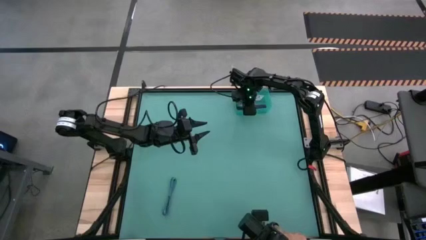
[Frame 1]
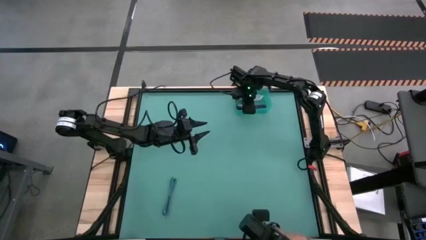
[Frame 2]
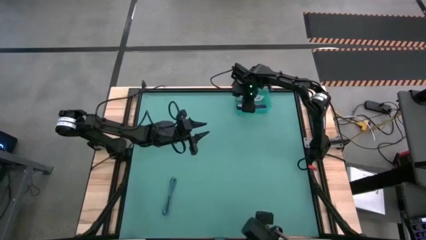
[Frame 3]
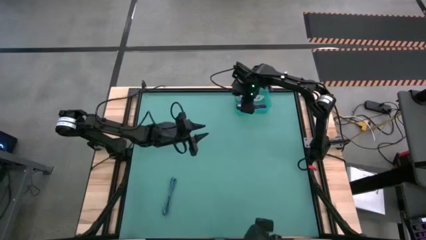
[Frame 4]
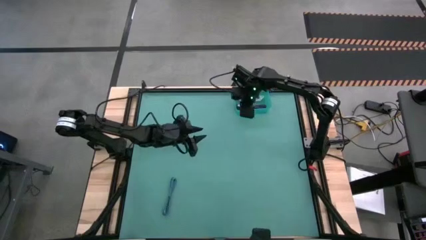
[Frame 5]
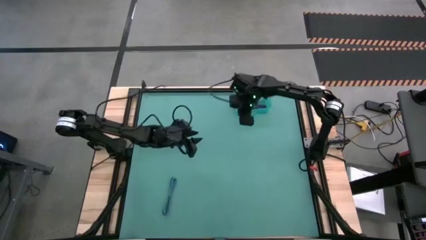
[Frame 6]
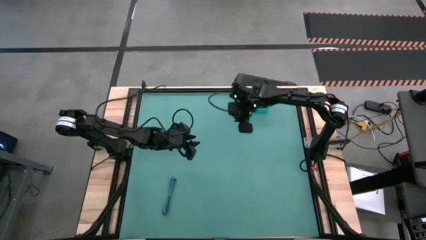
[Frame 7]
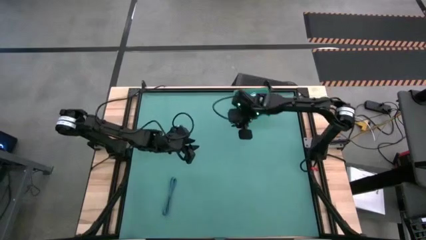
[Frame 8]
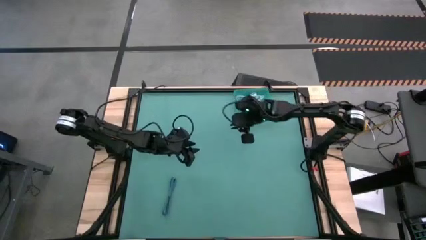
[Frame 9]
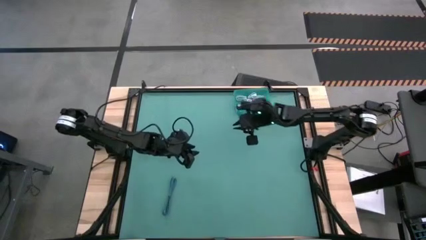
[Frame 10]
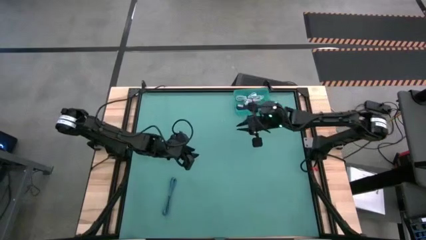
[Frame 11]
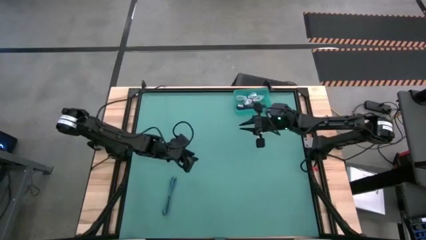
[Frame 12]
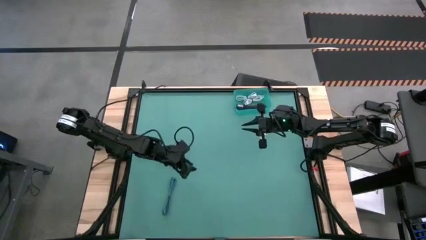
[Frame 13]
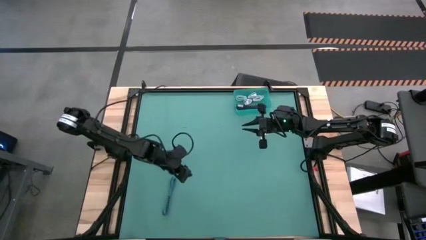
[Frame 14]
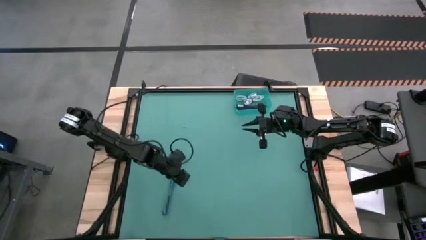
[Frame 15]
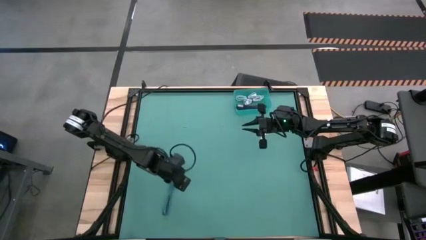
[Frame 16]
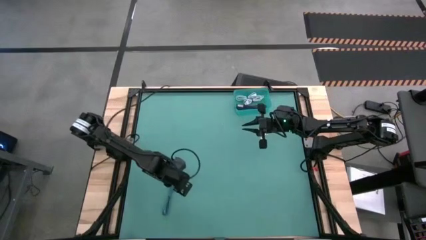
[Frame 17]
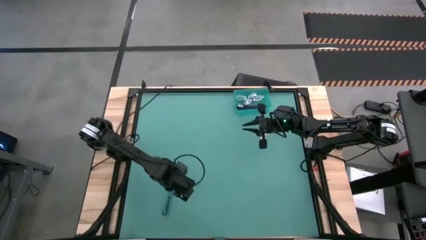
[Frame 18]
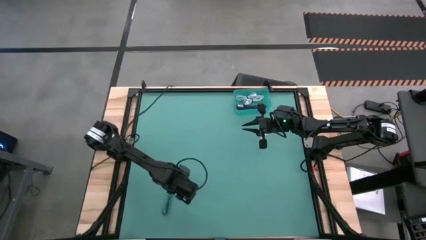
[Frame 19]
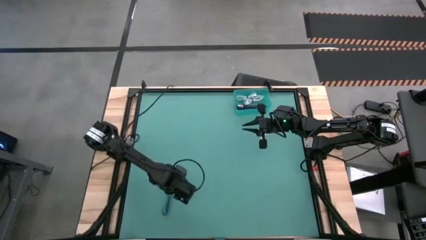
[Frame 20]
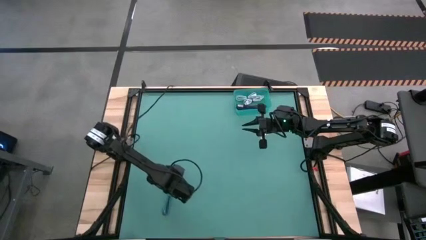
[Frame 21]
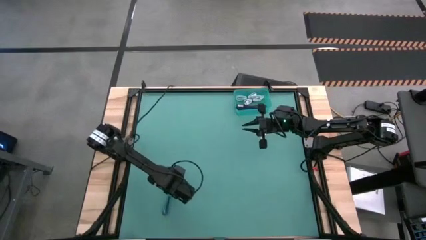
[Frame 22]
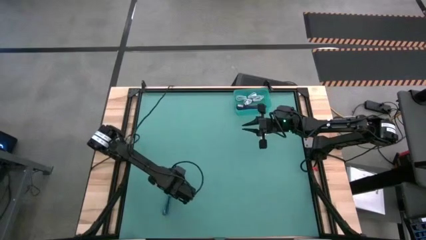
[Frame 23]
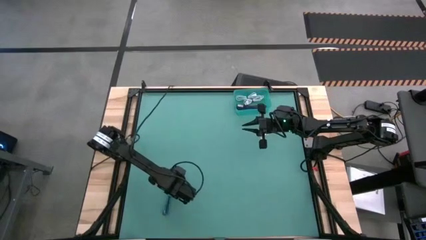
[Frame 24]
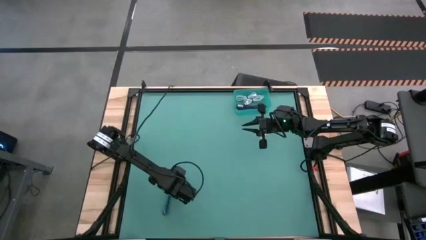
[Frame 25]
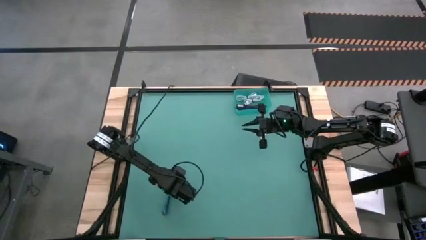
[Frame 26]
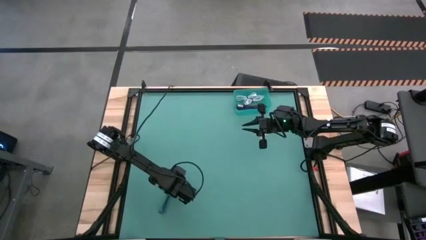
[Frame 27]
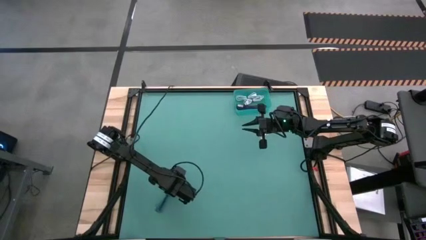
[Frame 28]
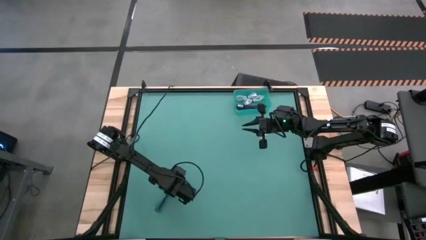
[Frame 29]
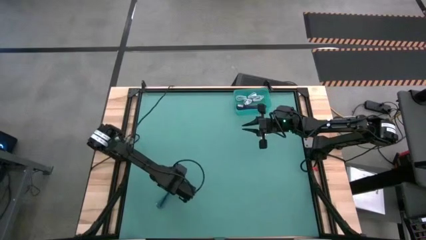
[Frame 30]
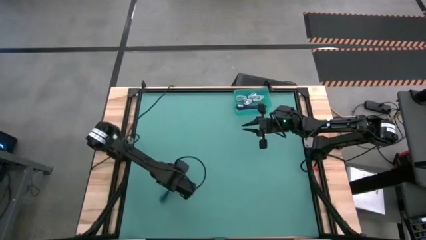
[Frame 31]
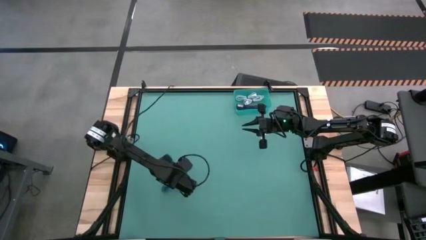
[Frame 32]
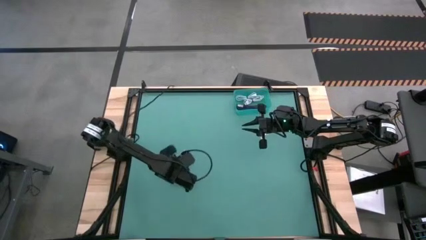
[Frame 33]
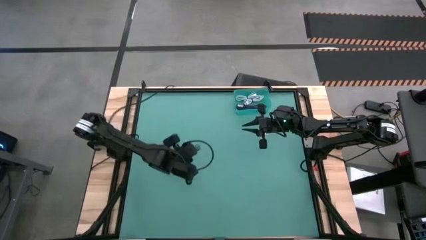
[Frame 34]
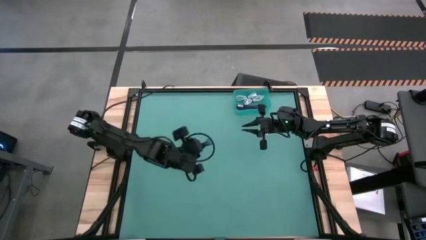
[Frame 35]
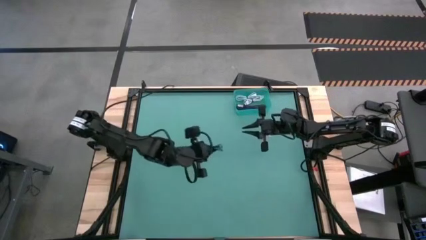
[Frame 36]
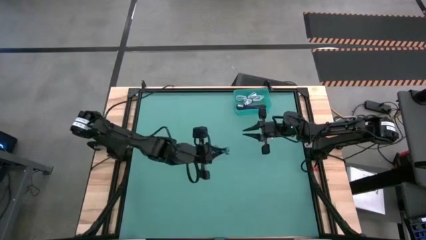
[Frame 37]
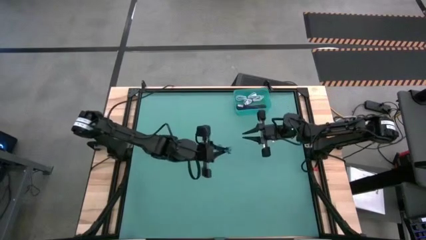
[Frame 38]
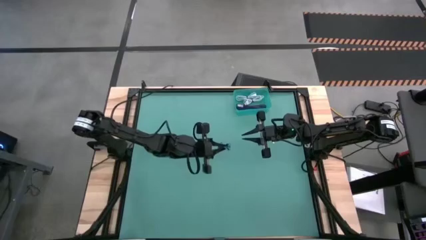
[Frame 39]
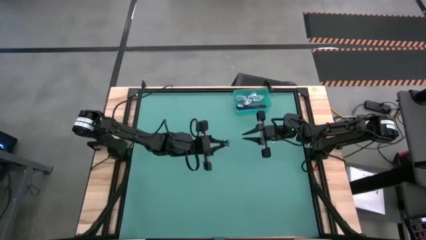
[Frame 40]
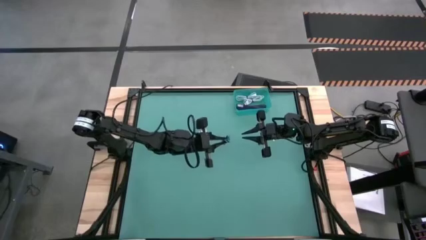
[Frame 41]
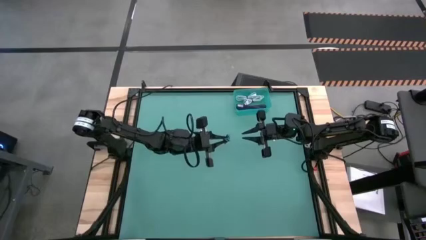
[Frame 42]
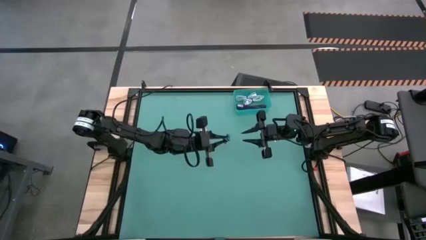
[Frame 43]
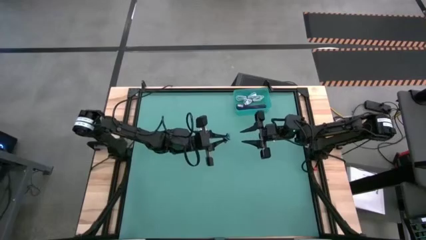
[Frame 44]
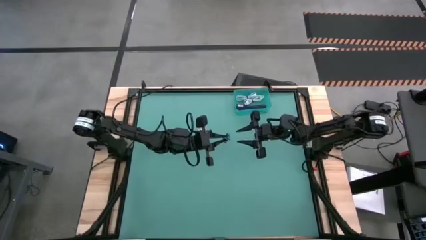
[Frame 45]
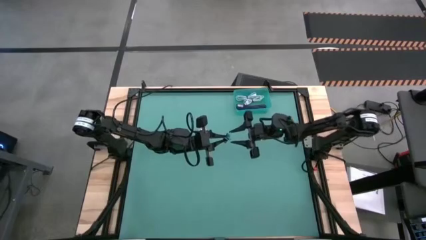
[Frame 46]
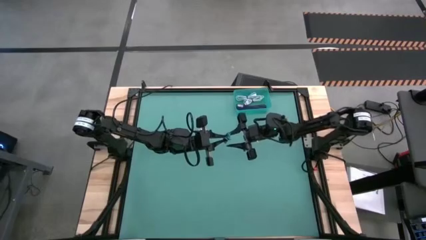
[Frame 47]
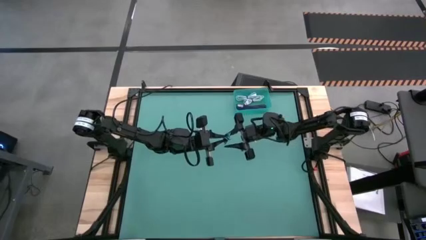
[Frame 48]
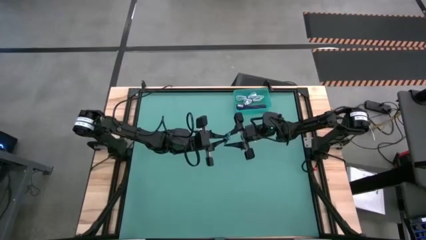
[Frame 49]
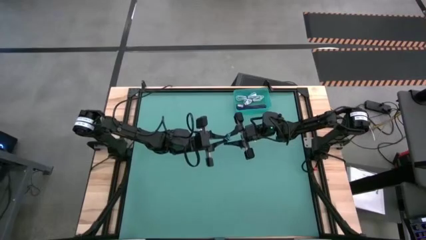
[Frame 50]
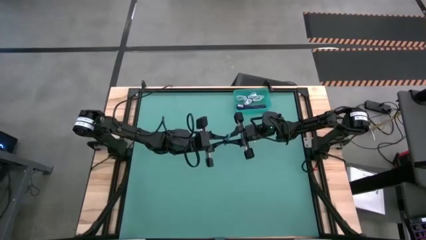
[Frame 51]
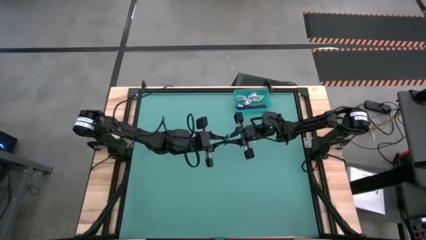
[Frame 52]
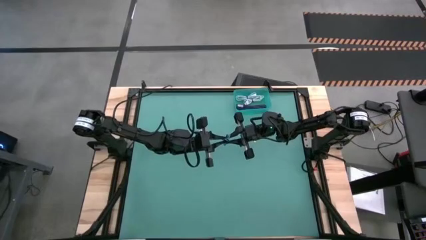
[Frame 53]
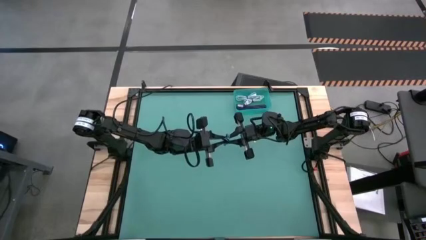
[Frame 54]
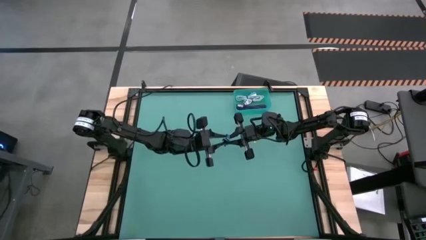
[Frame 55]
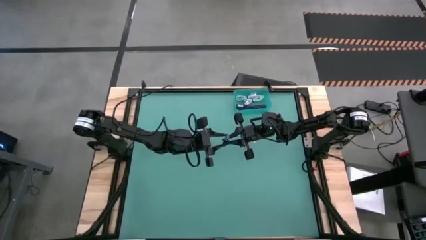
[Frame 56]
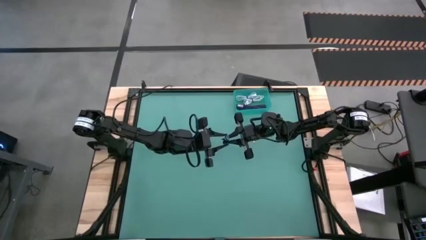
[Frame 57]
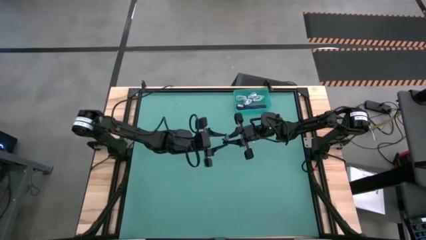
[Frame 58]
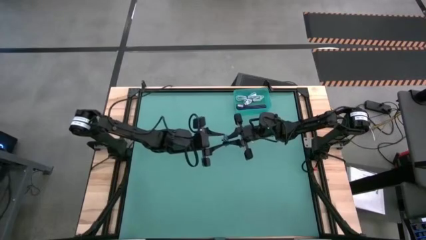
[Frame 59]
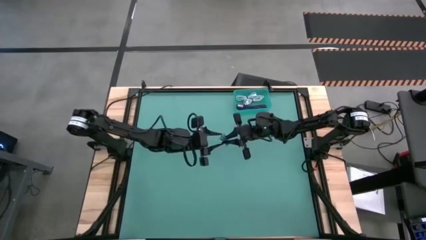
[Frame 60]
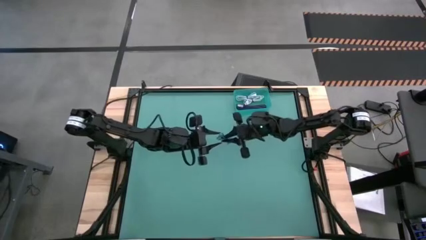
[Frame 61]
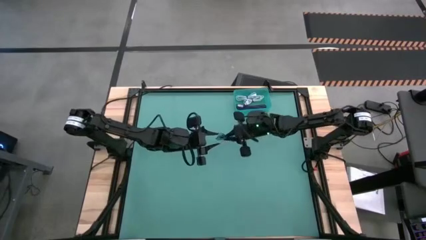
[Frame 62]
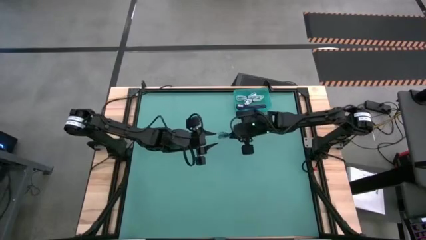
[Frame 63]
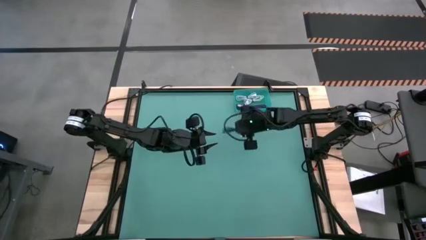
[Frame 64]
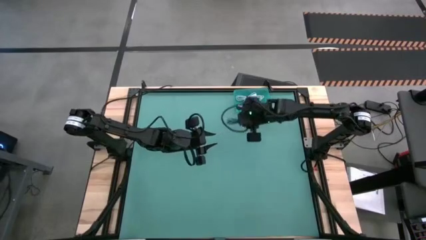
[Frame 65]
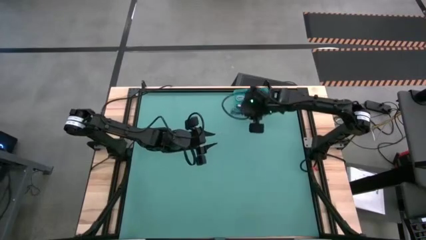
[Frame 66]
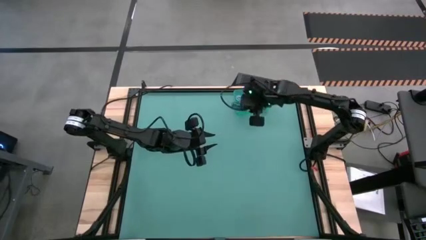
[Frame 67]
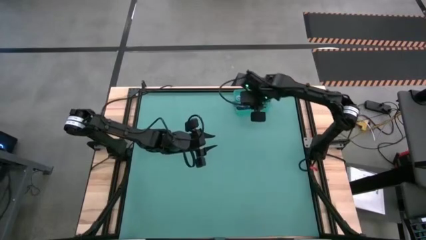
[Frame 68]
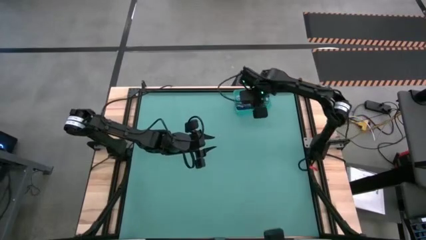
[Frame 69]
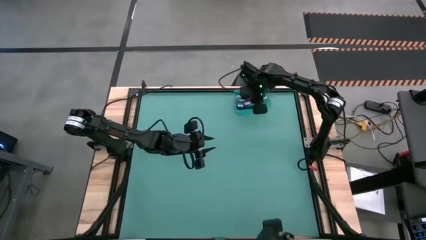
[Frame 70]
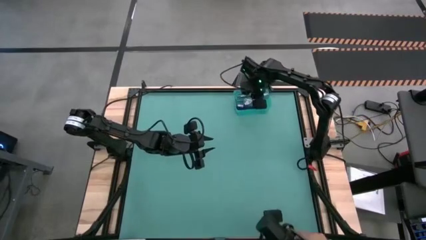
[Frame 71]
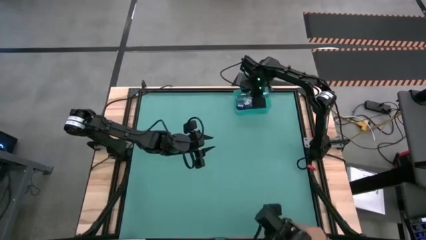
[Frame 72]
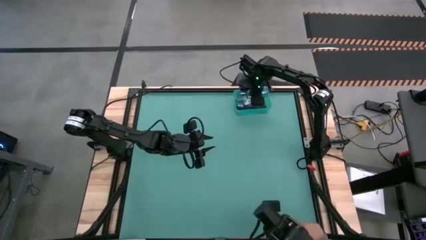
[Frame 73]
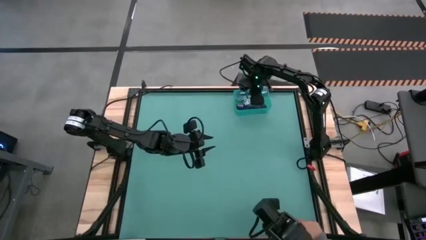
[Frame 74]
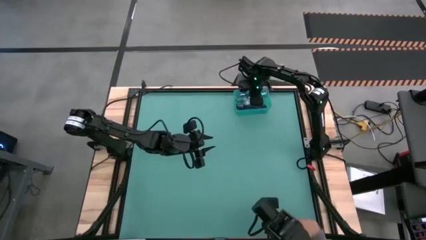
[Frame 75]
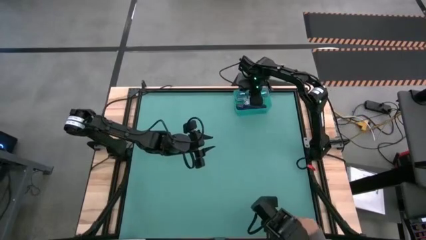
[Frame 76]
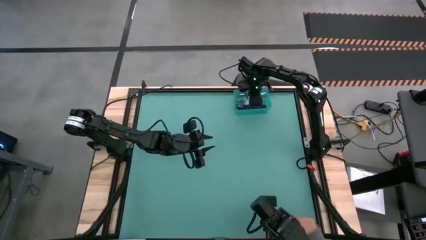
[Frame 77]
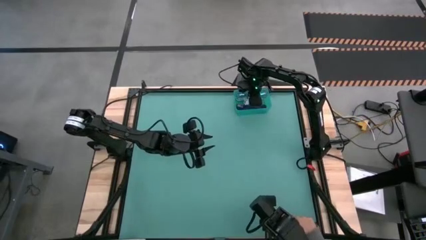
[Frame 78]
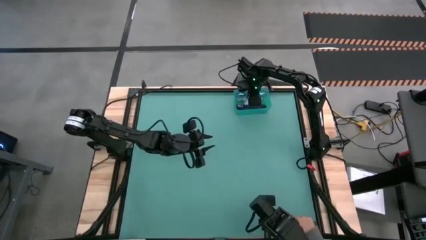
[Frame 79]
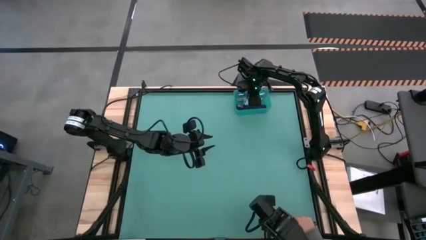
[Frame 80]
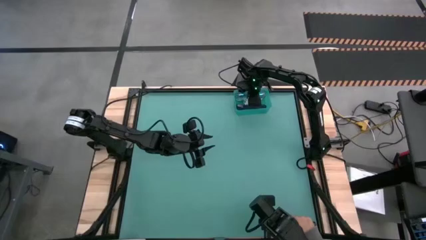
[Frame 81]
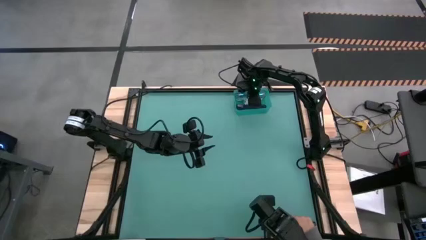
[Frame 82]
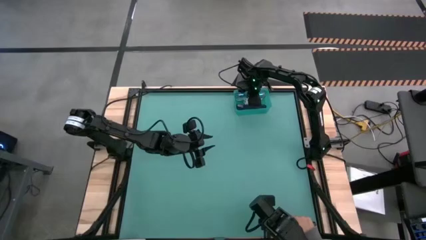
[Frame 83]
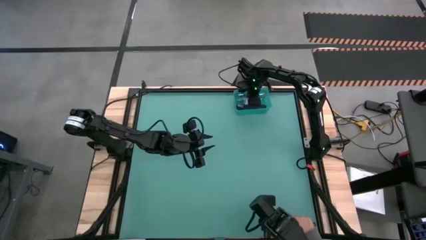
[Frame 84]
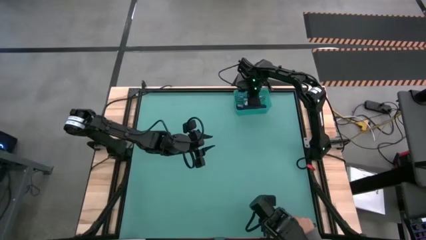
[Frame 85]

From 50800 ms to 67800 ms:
Task: Pick and place USB-C Cables
Put the blue charger cable into the blue bin
